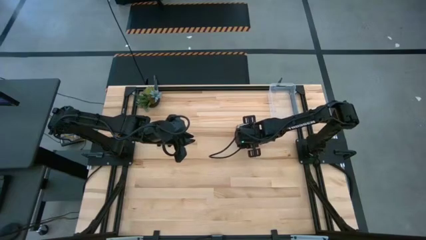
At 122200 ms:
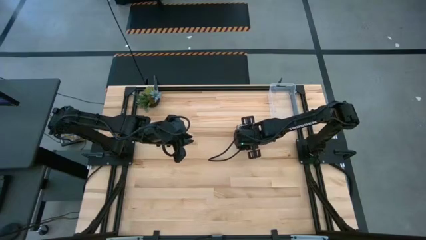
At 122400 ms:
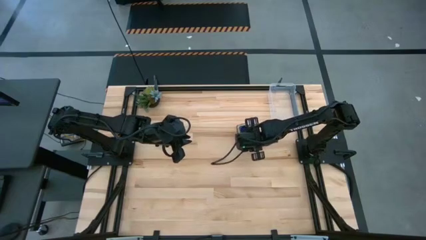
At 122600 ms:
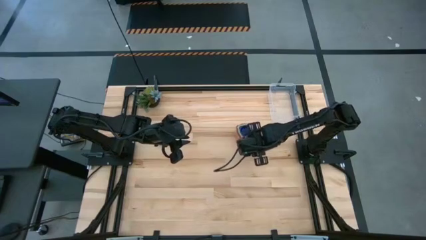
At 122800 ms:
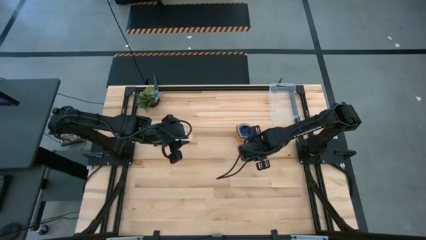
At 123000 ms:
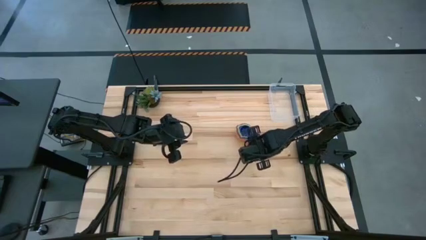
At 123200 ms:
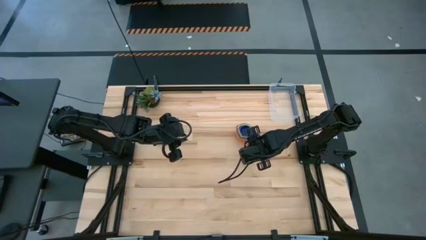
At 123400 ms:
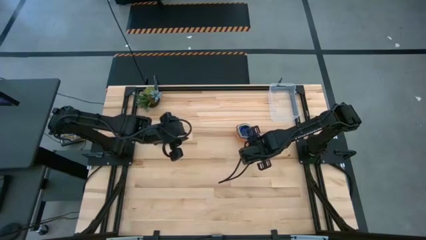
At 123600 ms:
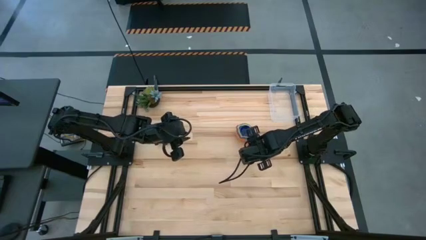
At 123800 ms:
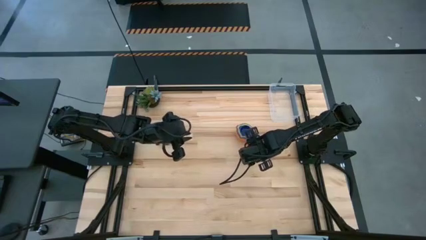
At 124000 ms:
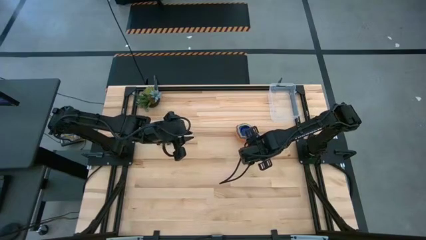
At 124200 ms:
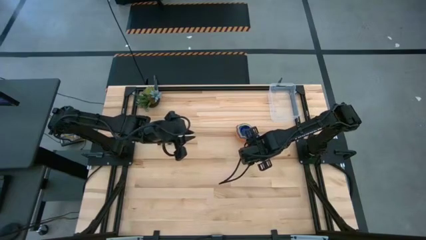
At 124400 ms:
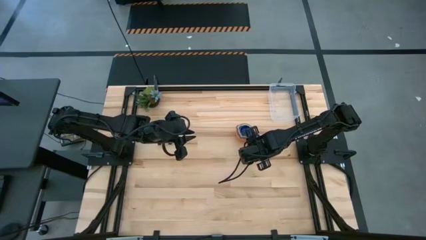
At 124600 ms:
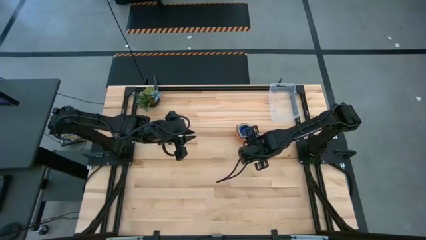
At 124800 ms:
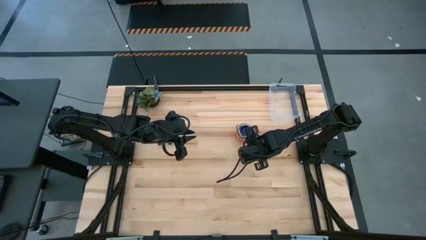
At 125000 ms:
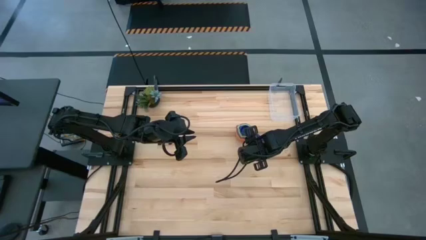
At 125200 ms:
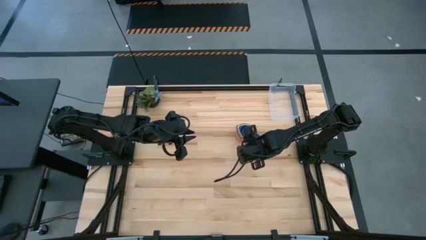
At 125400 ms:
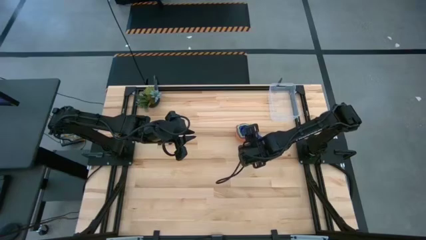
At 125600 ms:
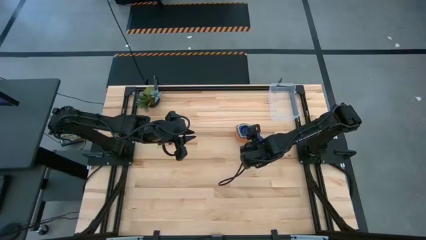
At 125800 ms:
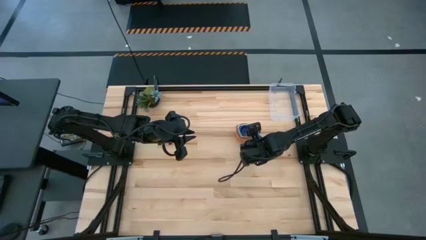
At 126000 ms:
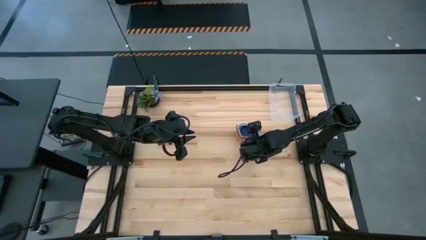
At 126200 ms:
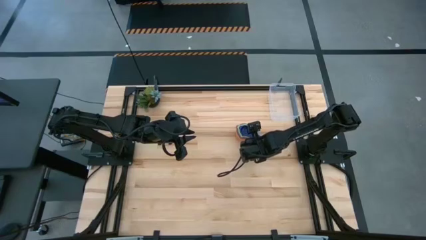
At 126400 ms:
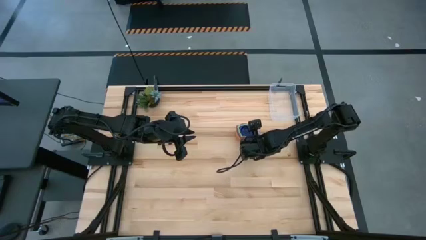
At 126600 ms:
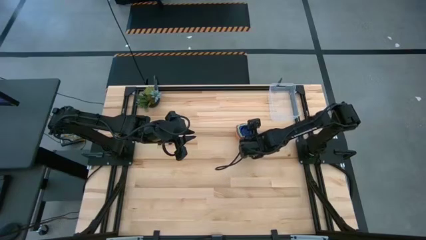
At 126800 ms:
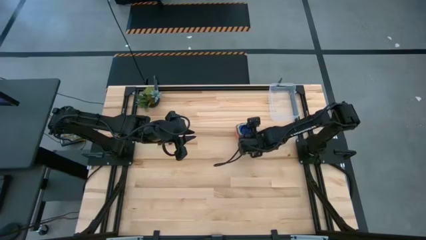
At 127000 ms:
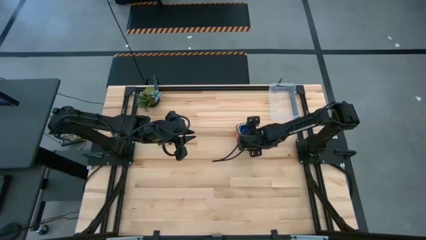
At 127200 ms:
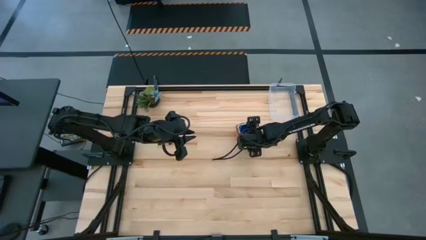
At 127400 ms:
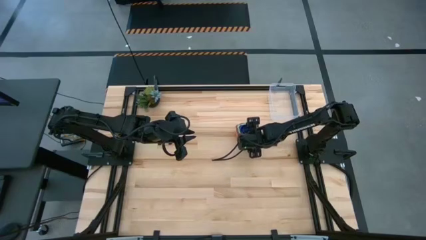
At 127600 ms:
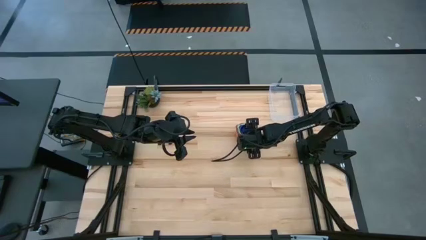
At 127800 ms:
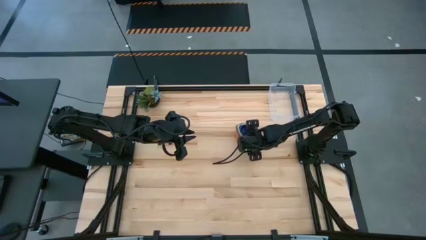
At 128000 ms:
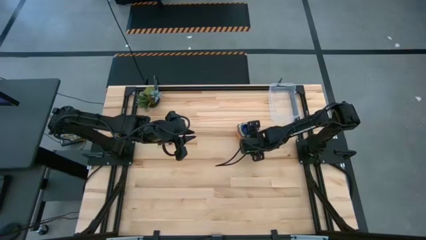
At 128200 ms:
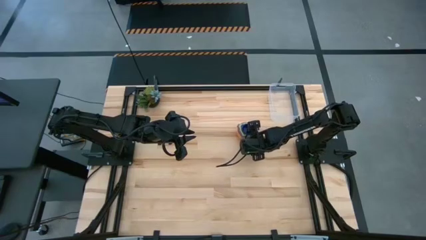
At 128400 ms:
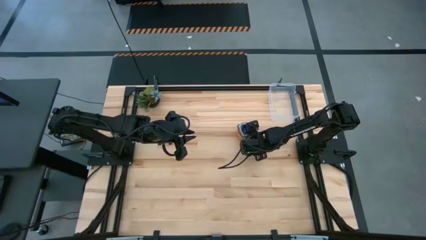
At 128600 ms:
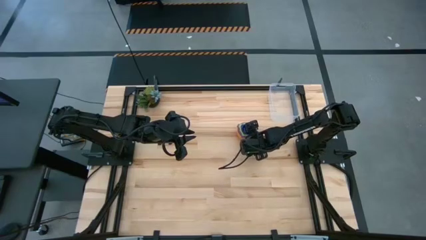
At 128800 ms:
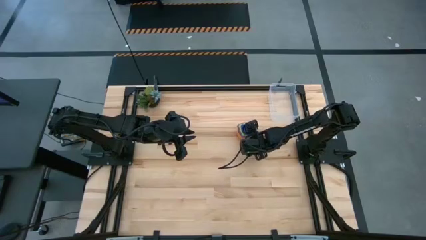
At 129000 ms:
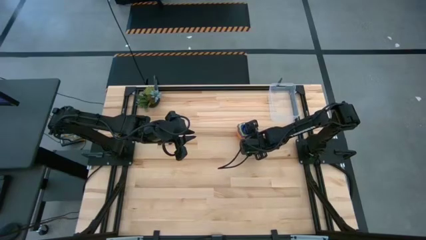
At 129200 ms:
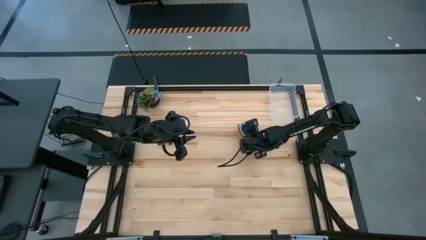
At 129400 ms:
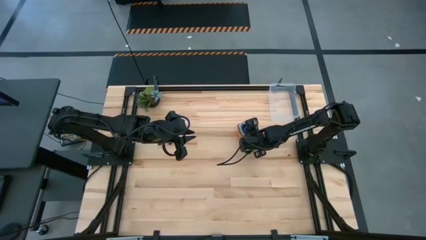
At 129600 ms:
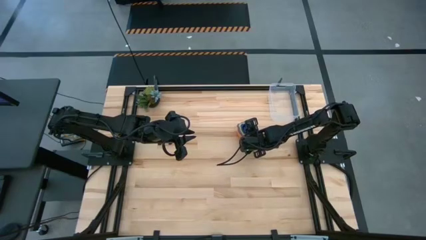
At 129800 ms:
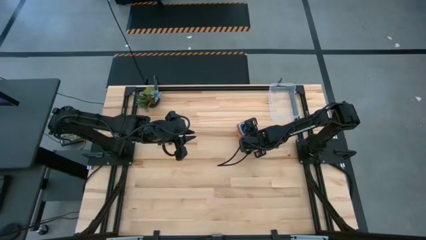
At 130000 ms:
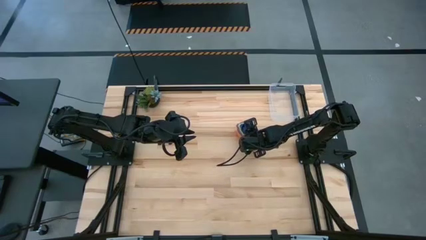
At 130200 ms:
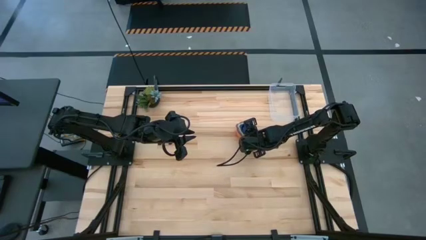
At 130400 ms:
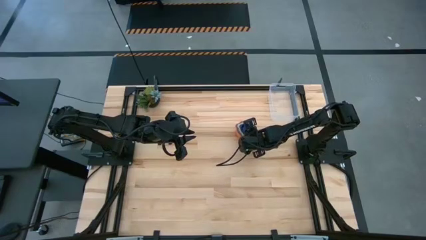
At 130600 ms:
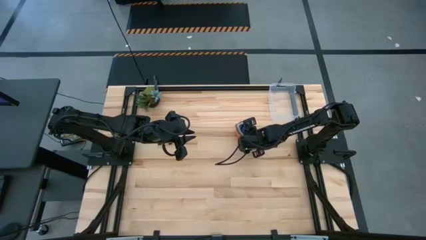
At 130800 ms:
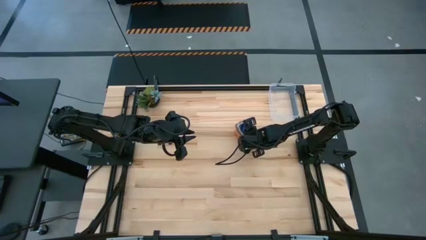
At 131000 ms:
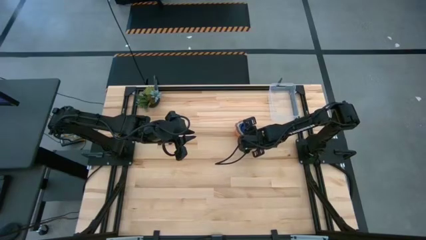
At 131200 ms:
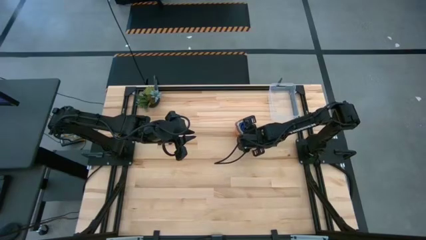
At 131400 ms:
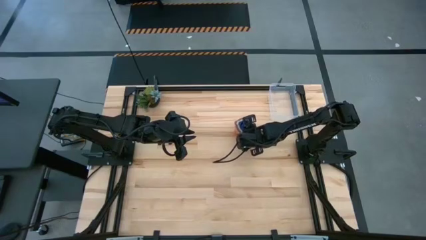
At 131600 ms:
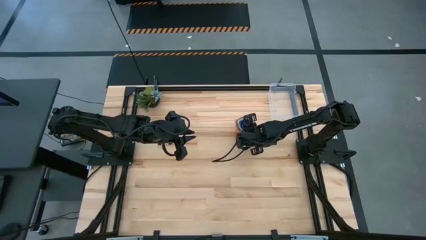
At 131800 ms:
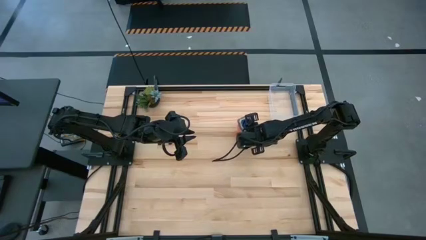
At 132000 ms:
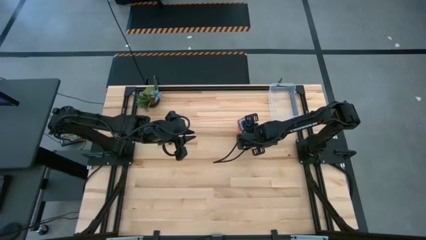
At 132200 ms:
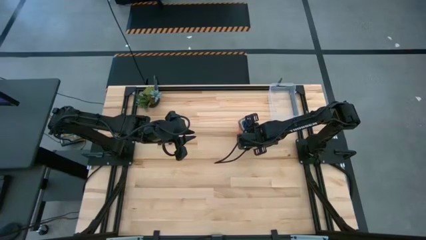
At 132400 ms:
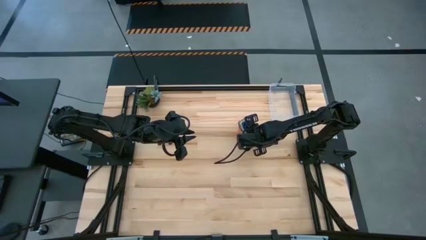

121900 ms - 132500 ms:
Task: Nest measuring cups in basket
Put the stacked measuring cups into the bin

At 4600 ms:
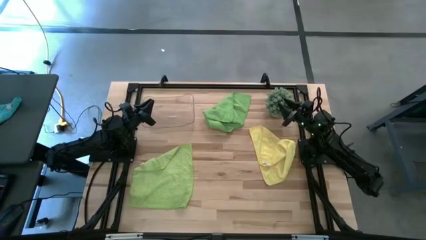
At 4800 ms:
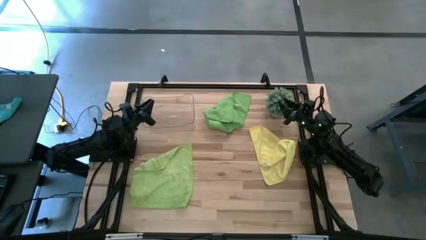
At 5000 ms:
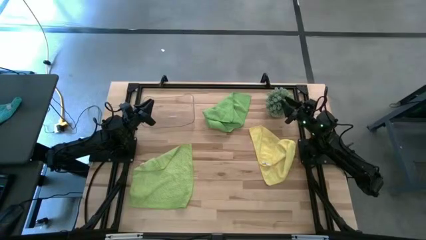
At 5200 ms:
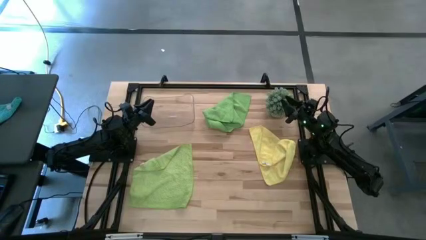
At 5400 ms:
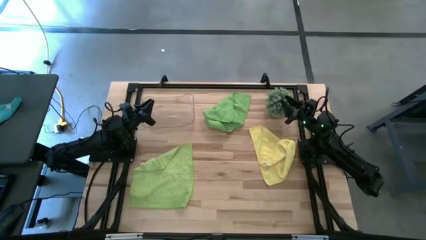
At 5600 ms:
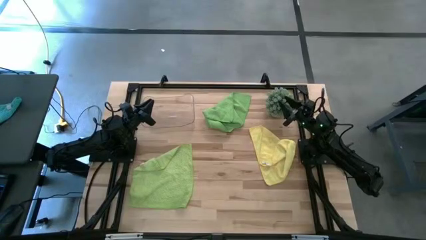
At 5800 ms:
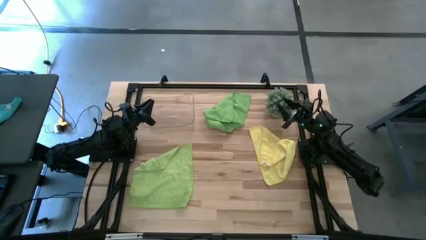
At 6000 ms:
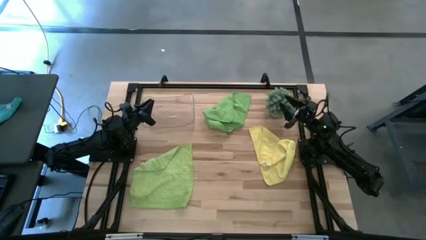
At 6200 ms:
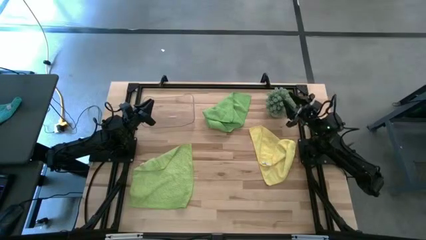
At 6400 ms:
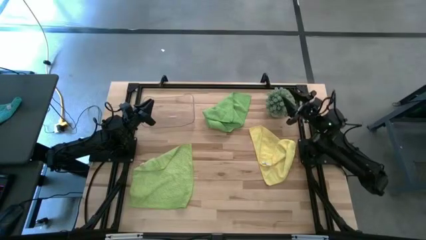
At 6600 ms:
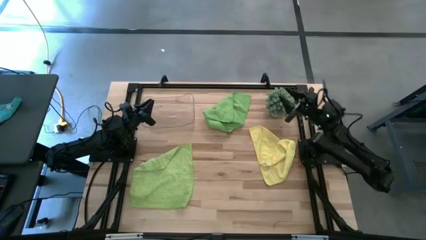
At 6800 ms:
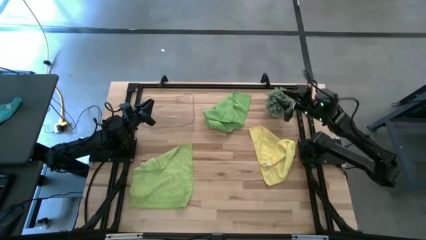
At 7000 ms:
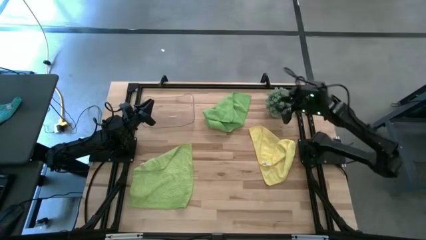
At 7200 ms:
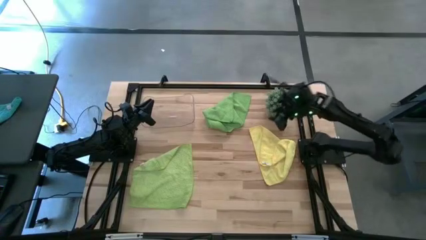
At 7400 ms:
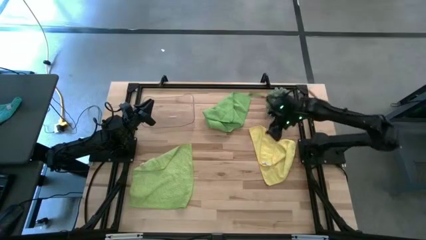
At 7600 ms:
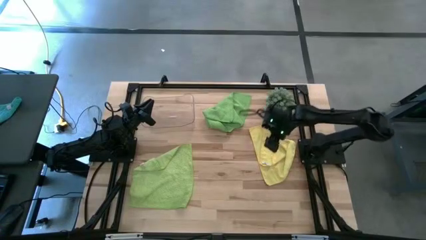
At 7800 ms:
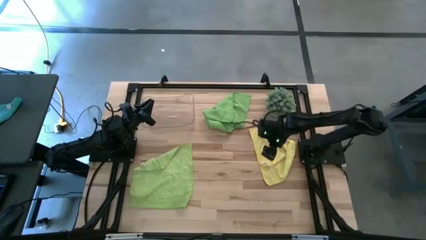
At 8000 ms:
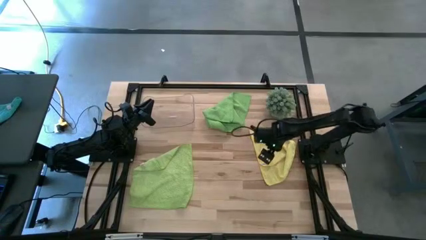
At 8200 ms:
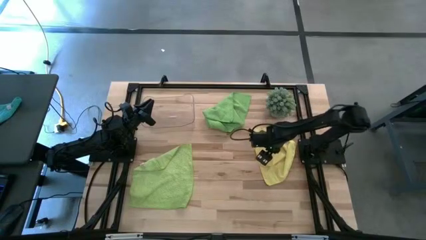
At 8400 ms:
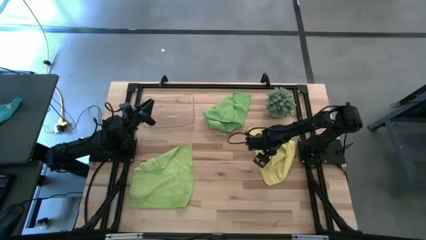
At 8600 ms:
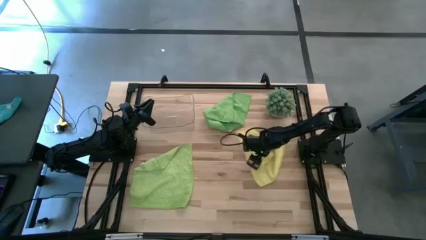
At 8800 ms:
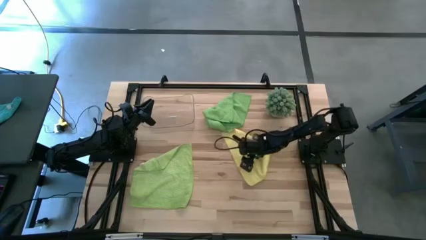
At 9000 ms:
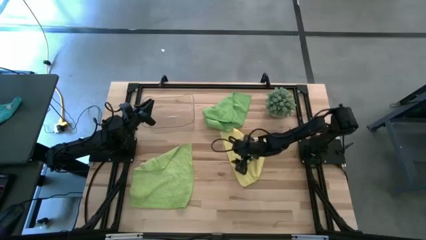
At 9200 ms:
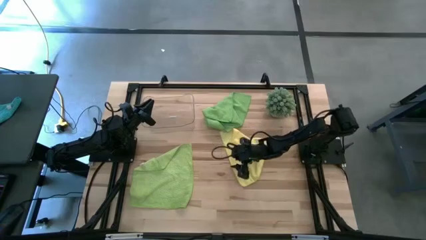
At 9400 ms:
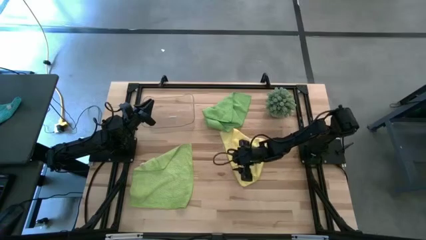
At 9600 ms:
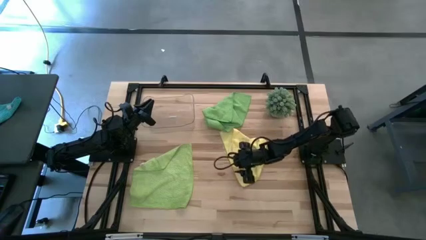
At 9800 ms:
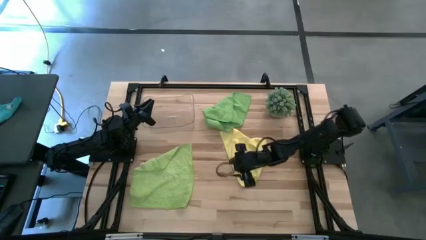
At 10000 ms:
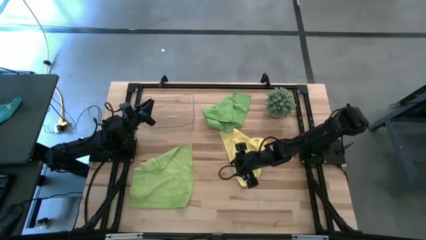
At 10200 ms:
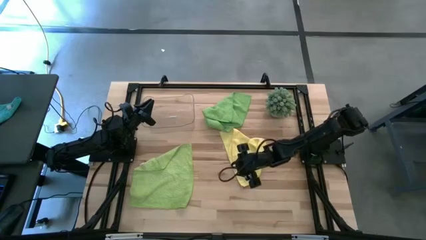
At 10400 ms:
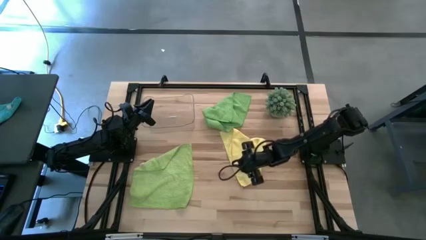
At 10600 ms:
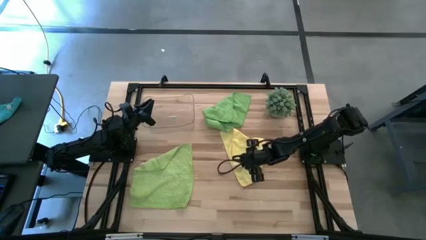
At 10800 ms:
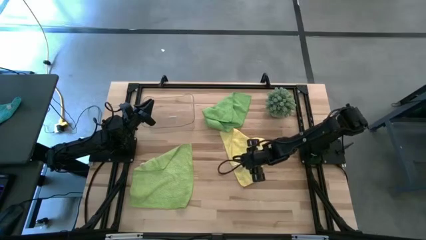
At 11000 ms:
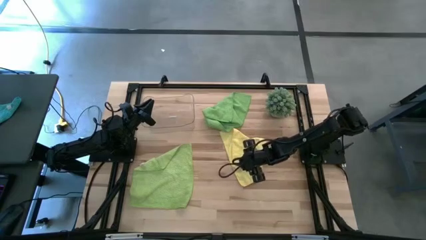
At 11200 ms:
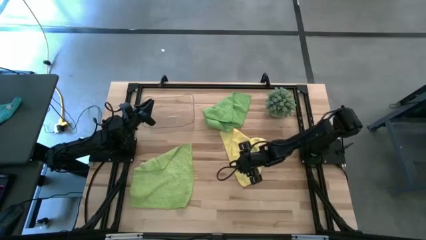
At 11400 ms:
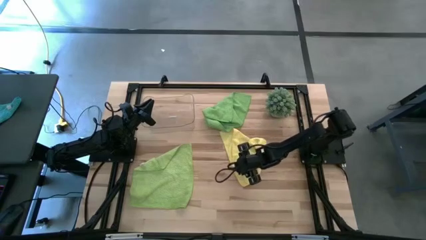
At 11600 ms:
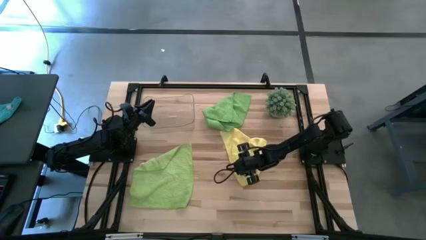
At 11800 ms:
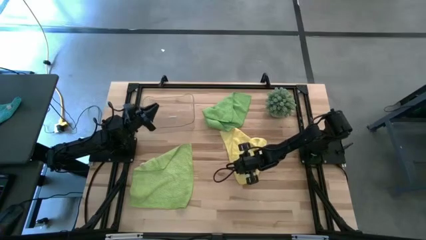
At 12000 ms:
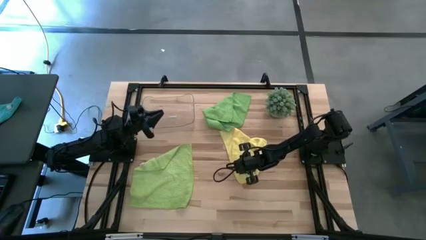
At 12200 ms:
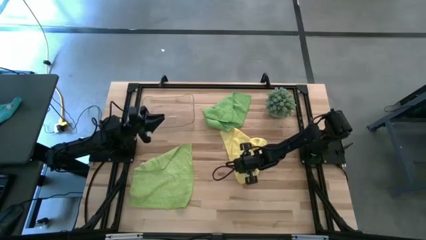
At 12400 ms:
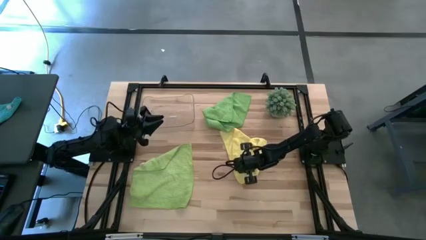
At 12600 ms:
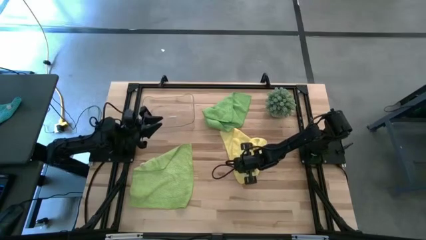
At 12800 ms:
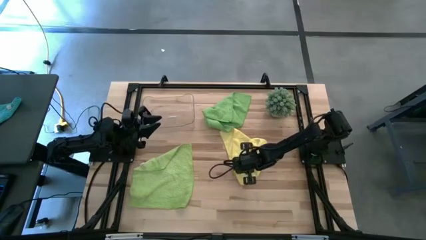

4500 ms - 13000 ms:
Task: Roll microfiber towels into tight, uniform cylinder then place into a basket
Fold the yellow towel
